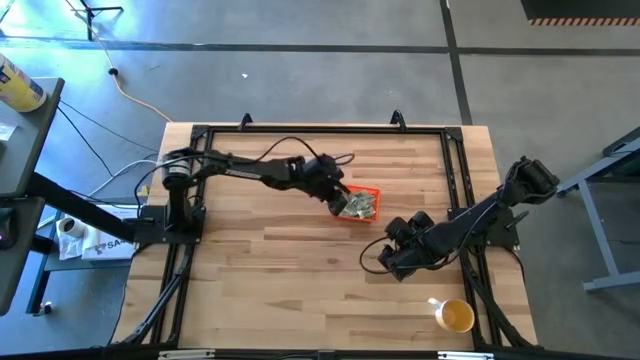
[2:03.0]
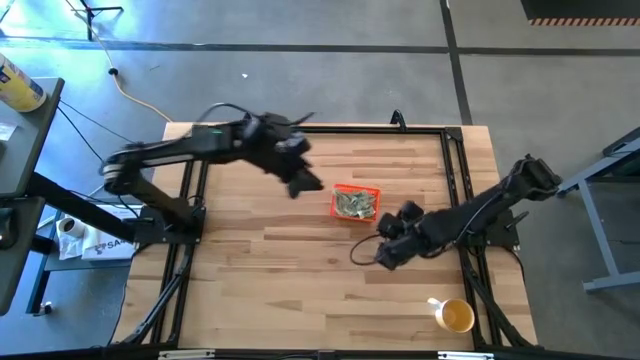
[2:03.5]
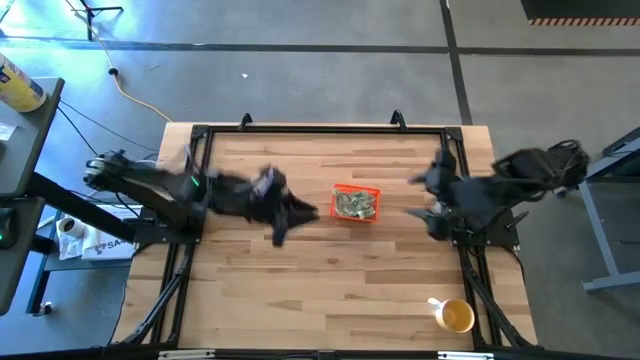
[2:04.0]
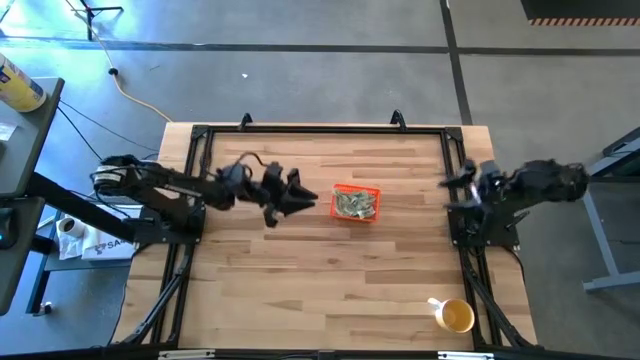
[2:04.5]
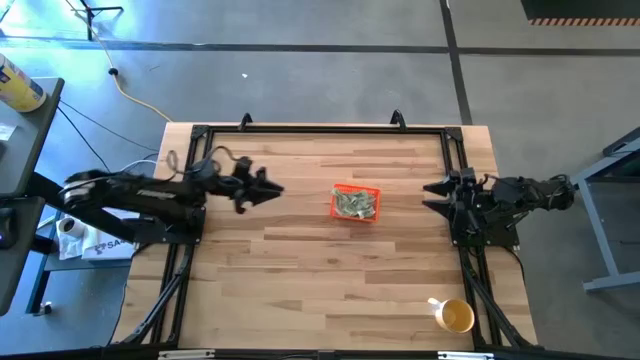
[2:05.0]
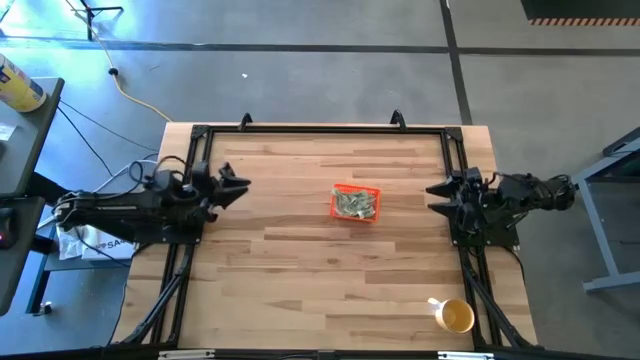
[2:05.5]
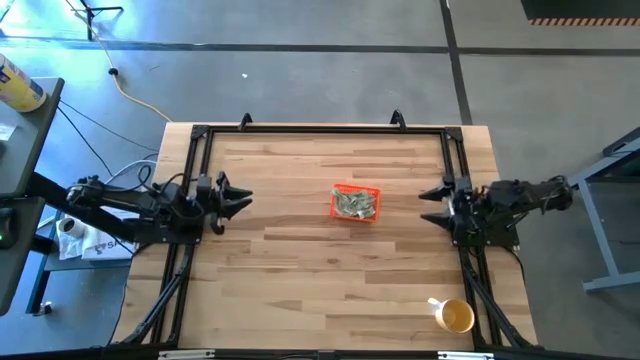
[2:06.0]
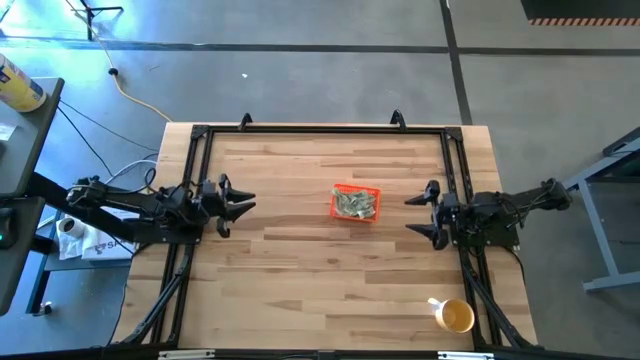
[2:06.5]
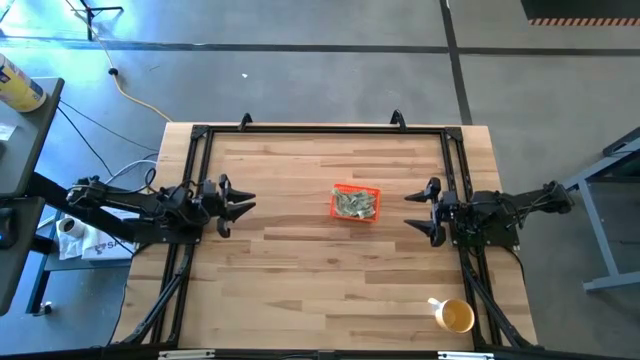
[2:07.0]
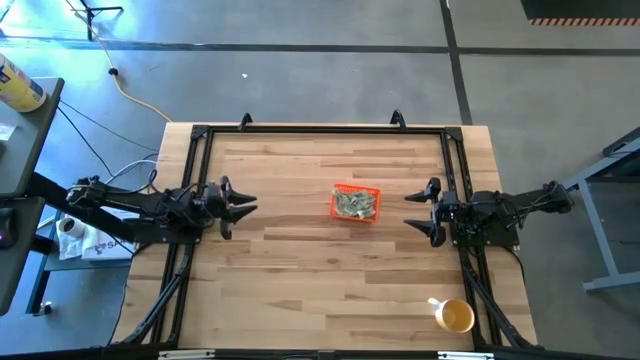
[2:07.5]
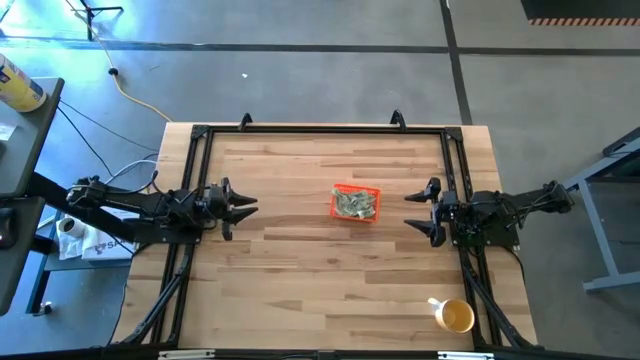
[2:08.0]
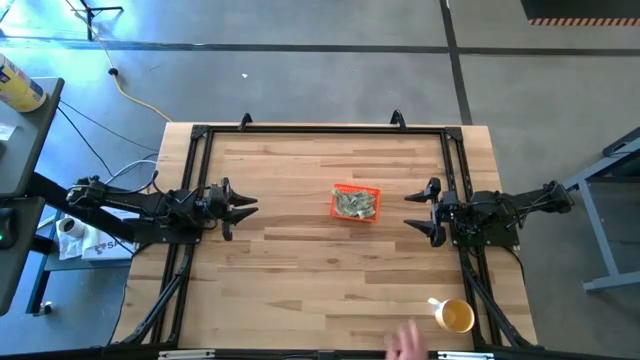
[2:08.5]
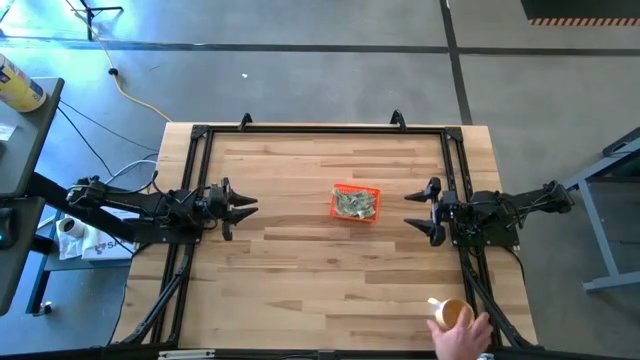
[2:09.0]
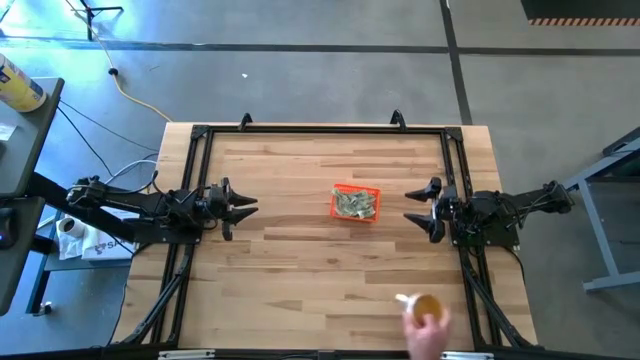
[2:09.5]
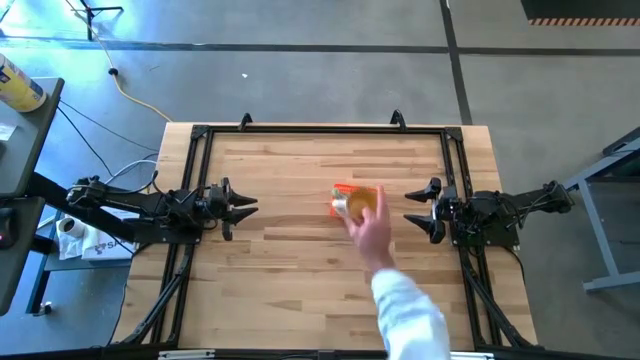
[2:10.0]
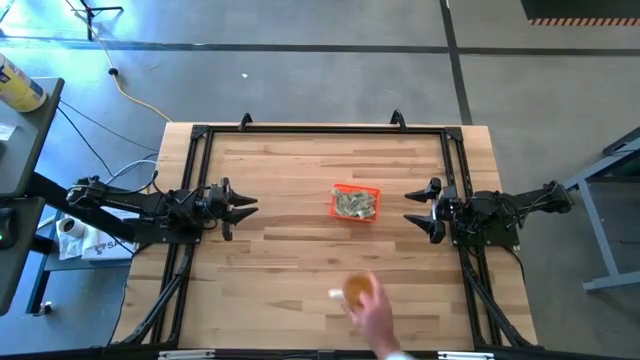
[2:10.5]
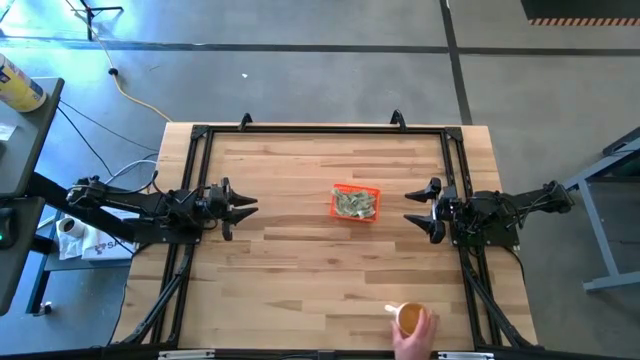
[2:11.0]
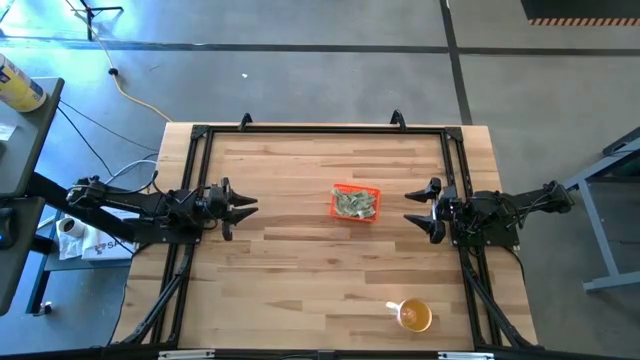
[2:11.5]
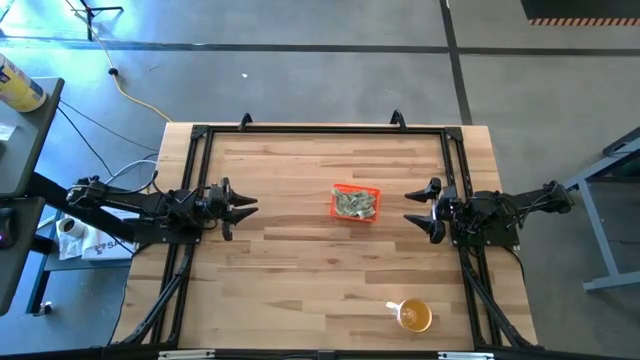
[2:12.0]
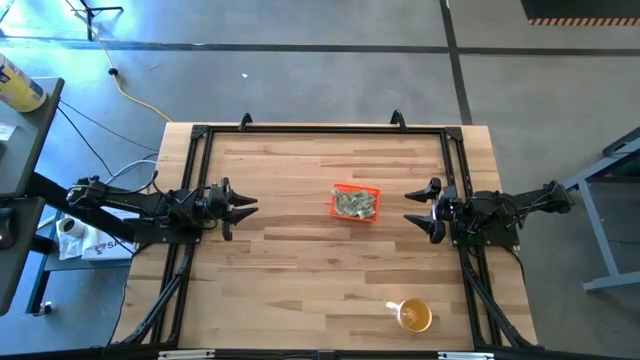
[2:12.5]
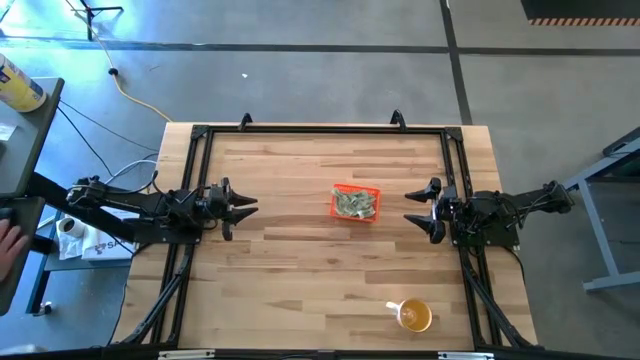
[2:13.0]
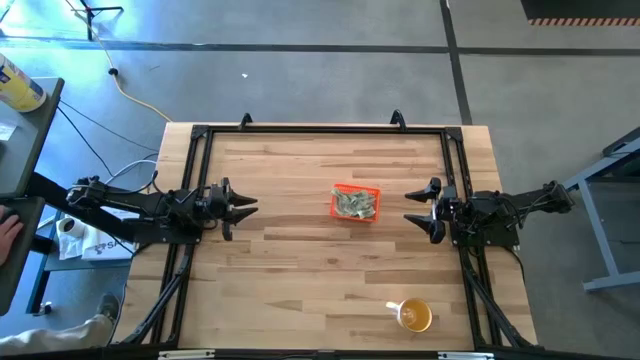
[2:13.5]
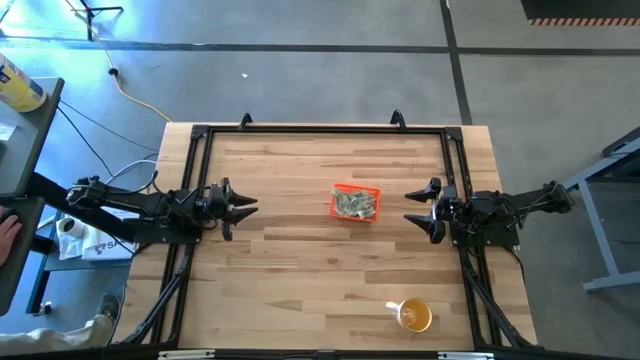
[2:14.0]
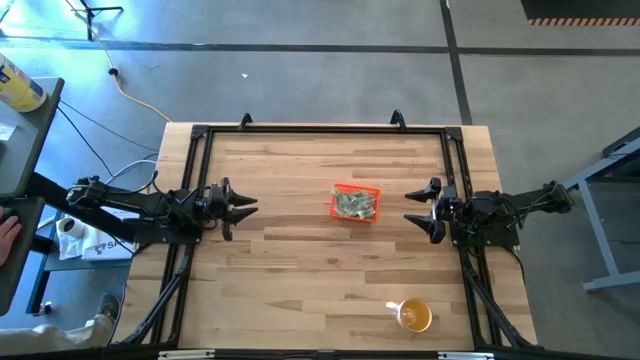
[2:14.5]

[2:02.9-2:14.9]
Task: Pick and place Stevia / Truvia into bins
Return to Home Position

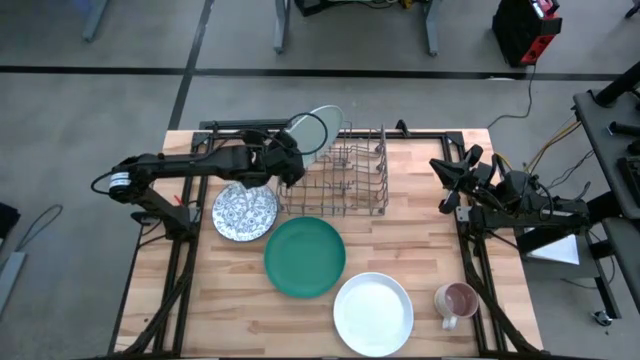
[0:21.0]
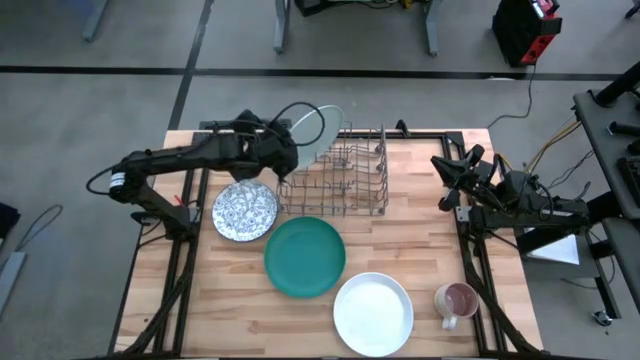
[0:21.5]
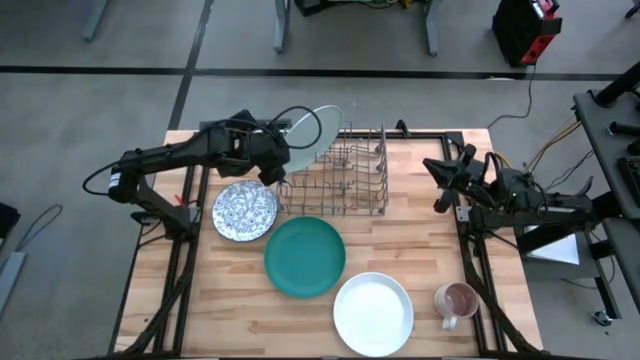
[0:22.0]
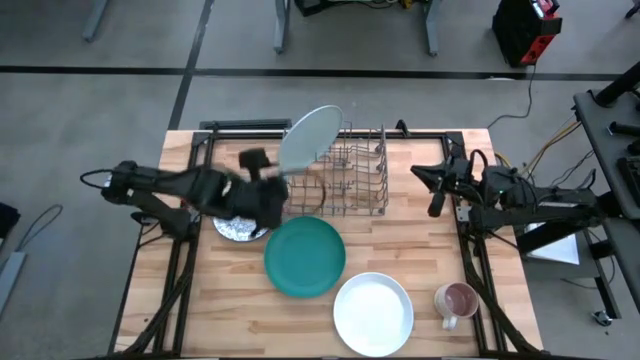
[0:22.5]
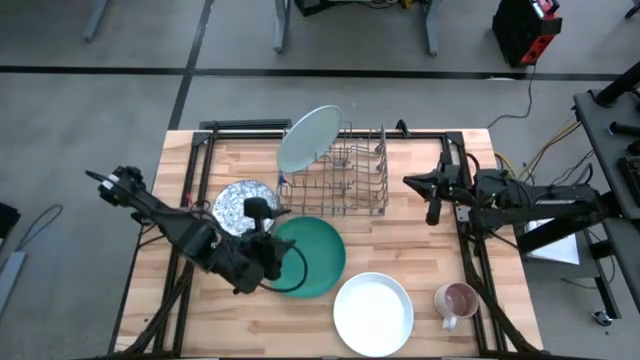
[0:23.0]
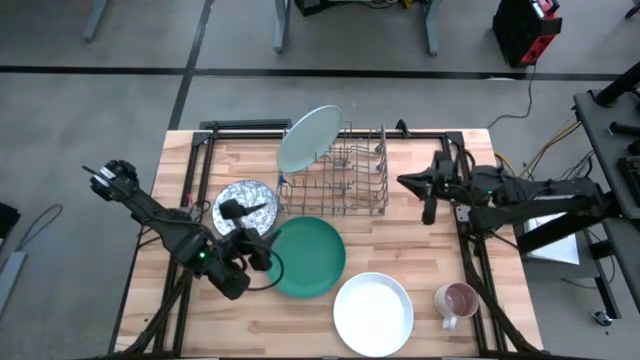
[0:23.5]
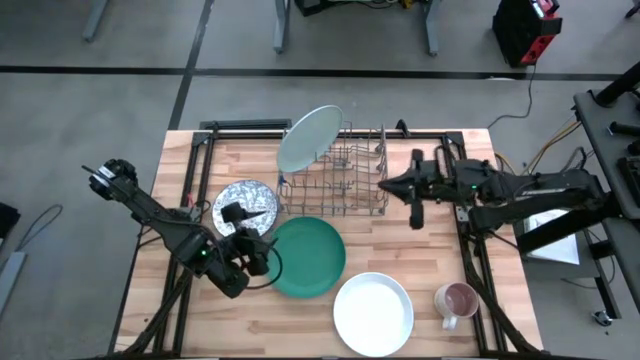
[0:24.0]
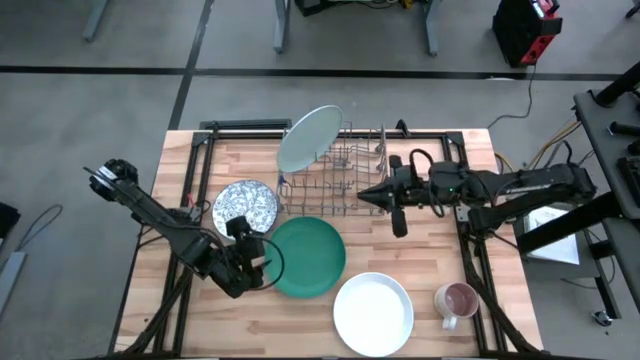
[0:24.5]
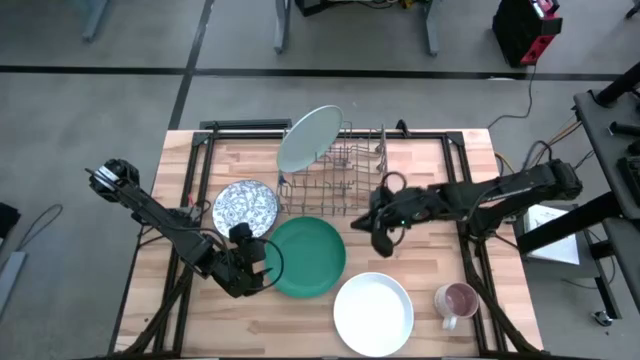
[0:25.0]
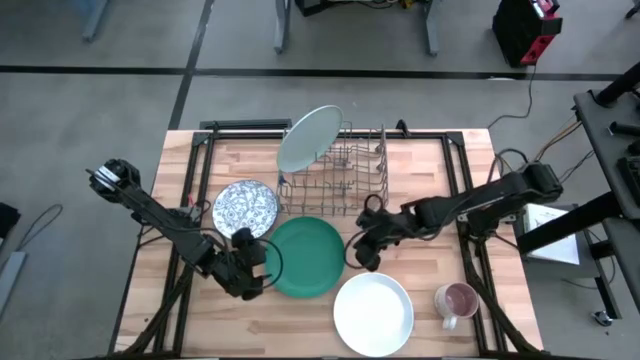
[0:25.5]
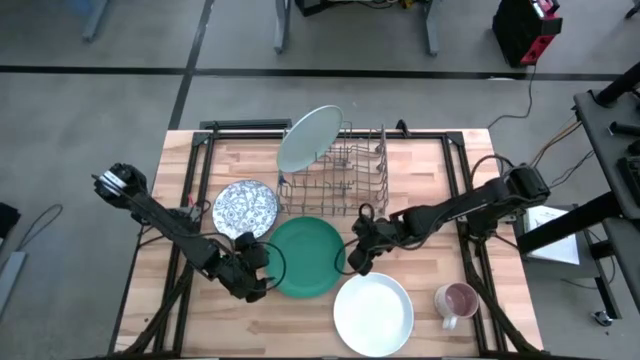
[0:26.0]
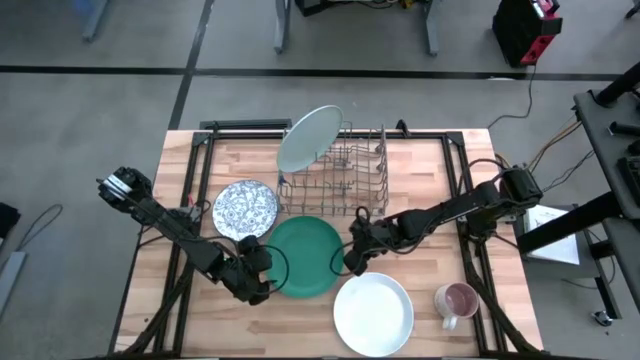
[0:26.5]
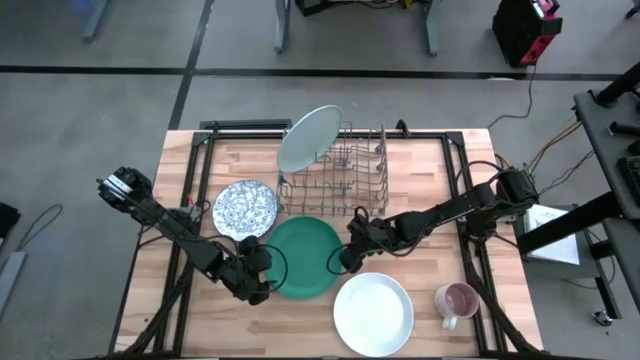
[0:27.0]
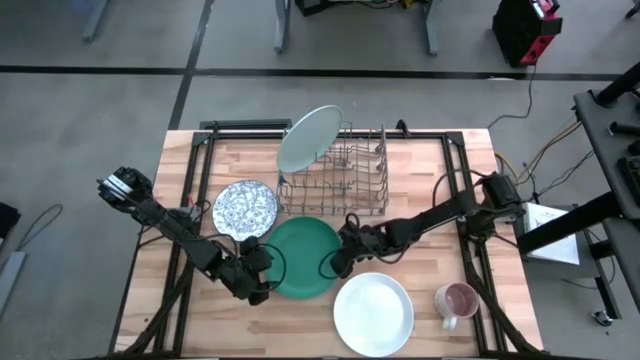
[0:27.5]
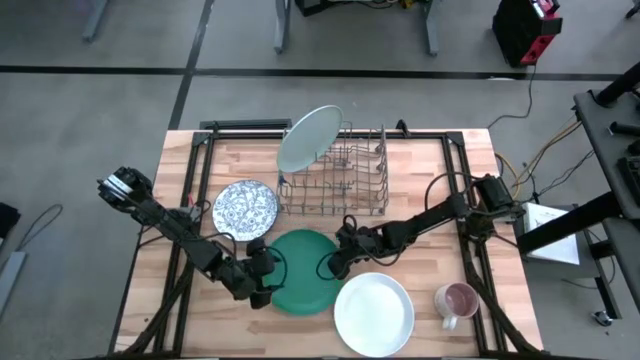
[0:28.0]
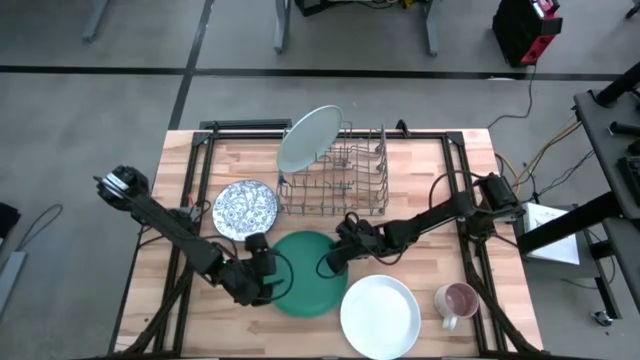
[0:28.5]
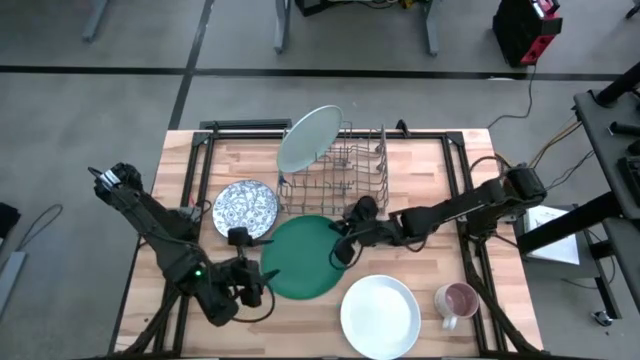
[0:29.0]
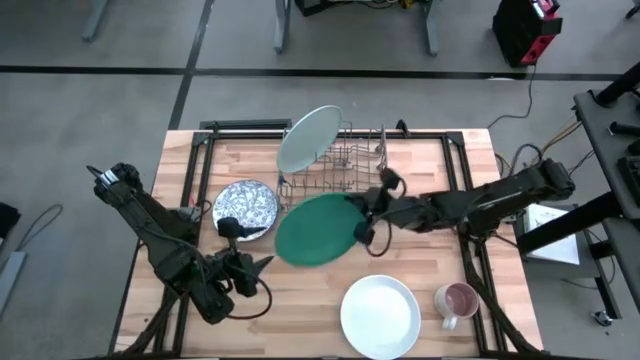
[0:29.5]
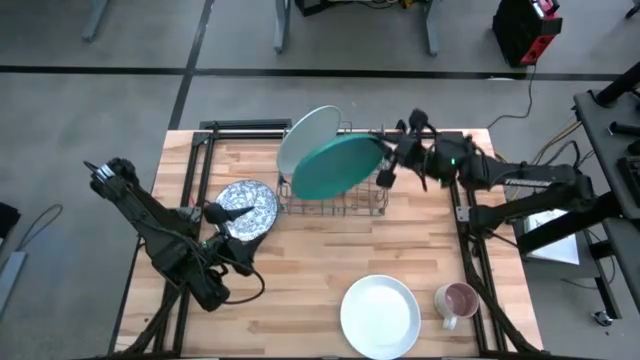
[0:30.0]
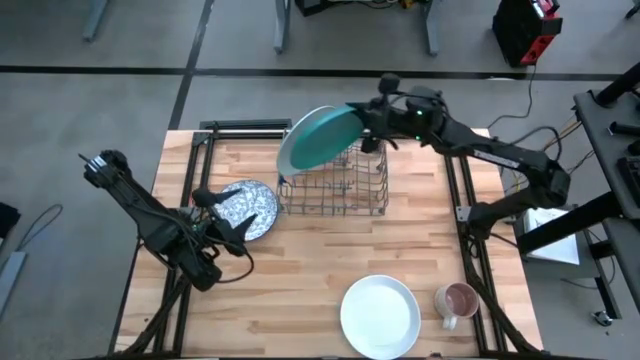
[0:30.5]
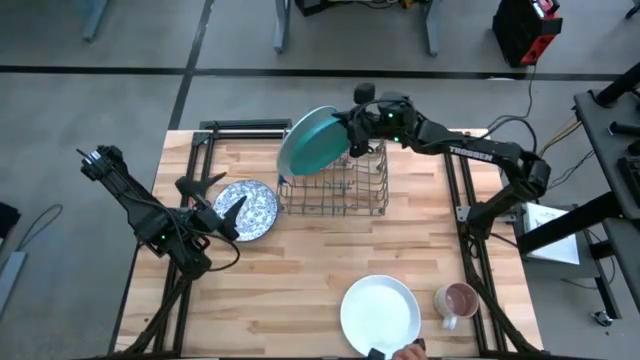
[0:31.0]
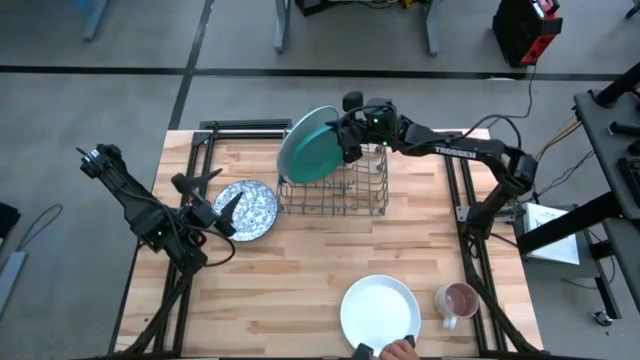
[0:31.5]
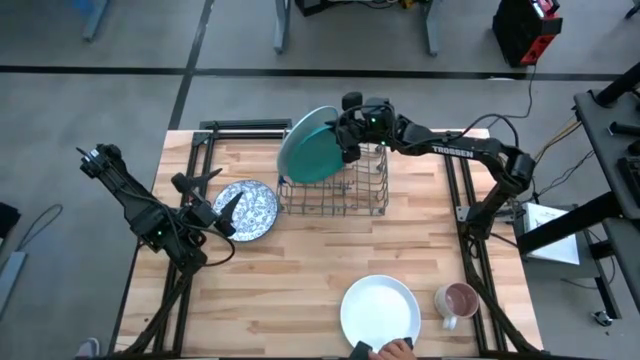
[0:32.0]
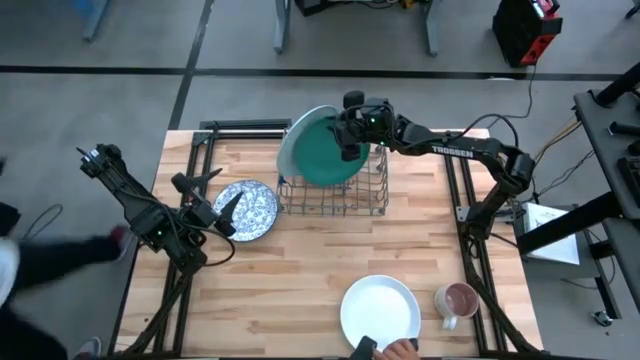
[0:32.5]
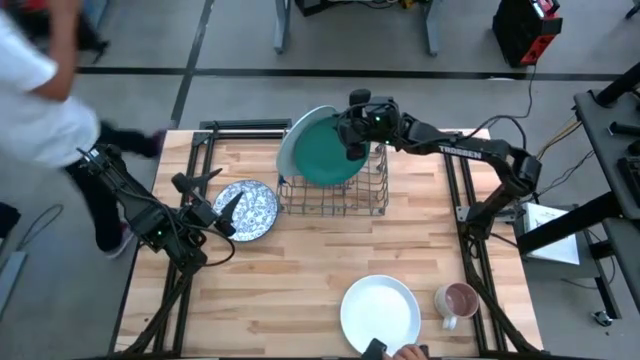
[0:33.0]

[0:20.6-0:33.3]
Task: Sort dishes
Put the green plate into the dish rack
